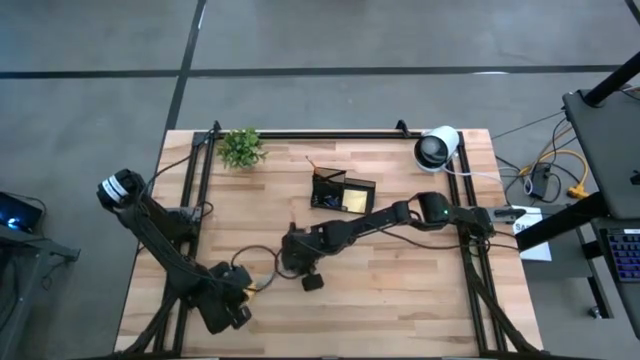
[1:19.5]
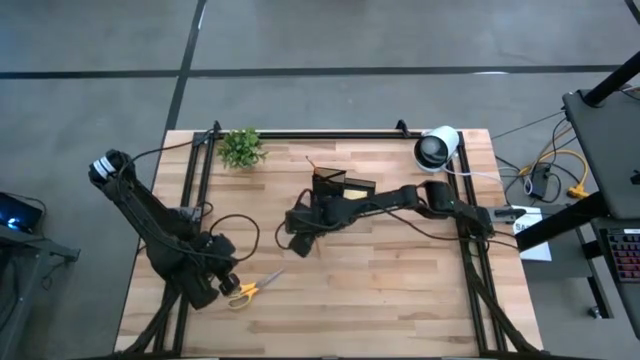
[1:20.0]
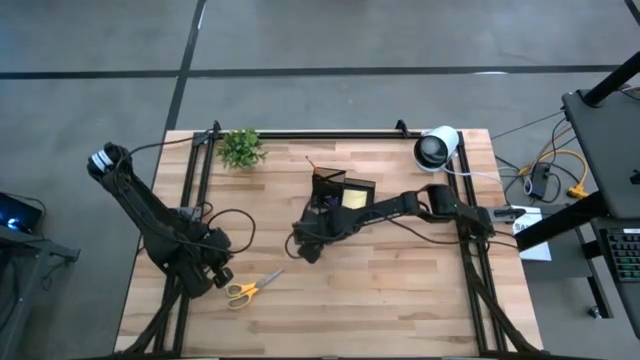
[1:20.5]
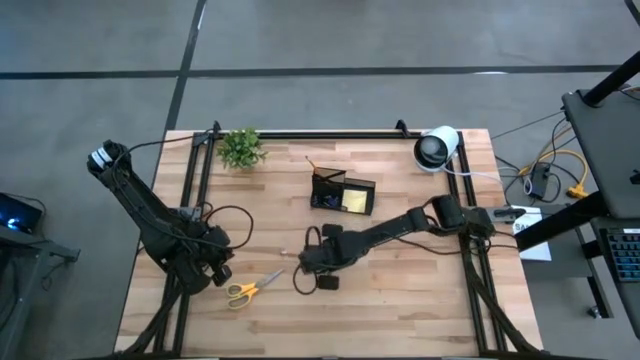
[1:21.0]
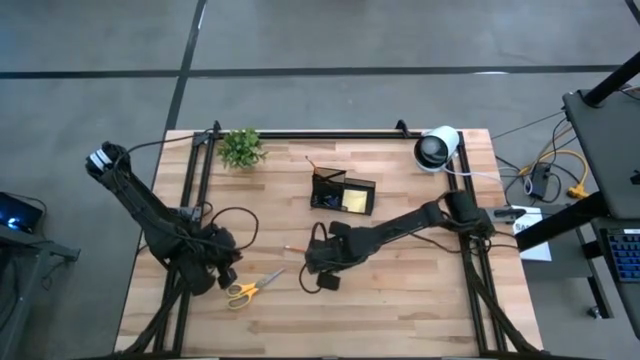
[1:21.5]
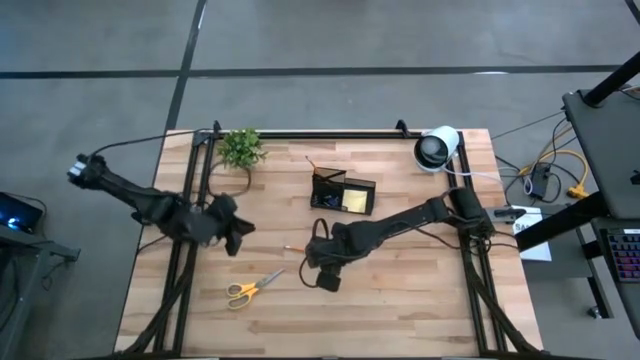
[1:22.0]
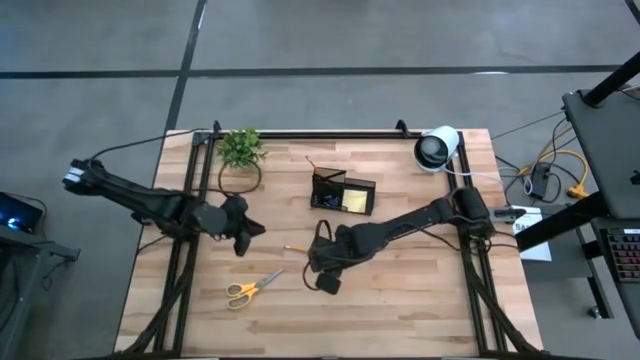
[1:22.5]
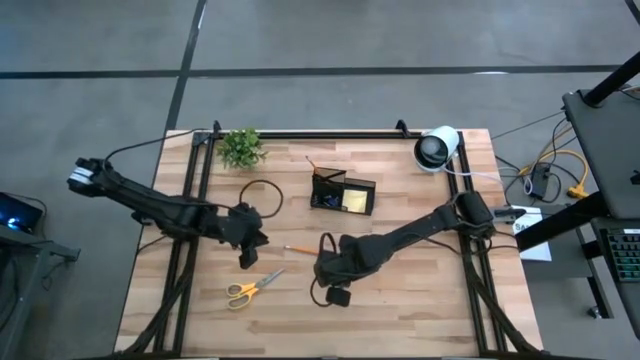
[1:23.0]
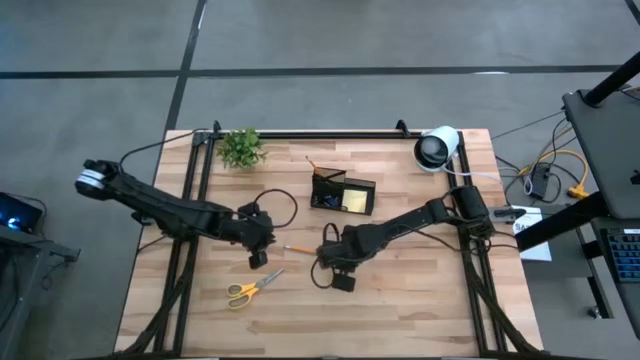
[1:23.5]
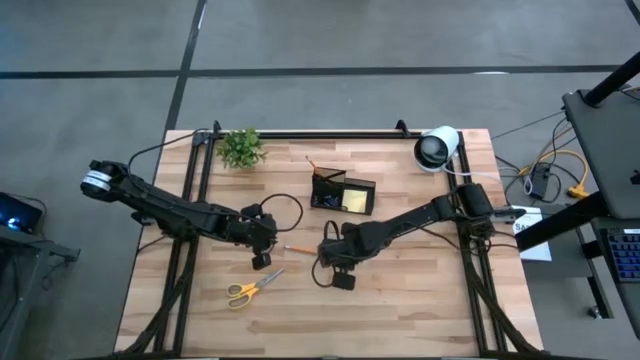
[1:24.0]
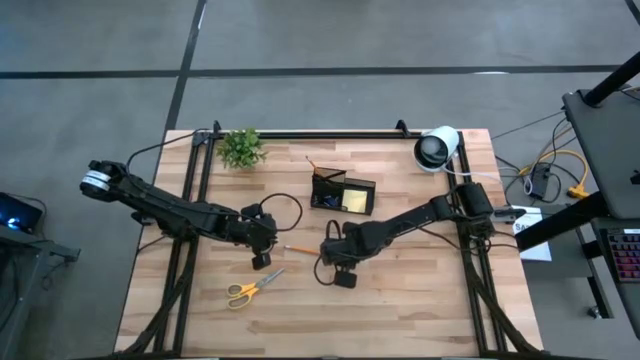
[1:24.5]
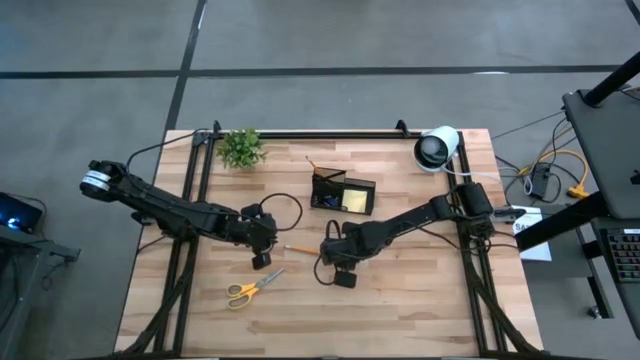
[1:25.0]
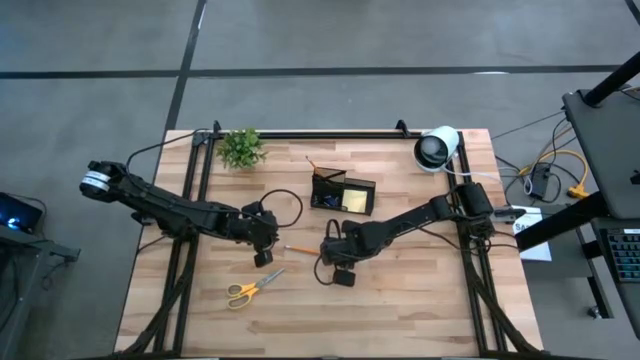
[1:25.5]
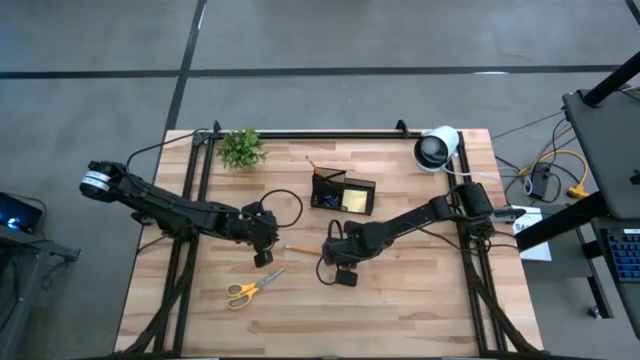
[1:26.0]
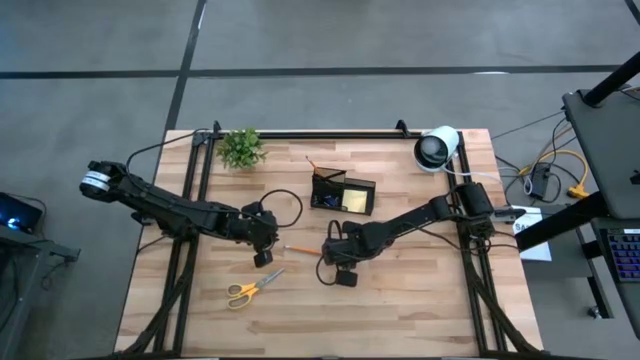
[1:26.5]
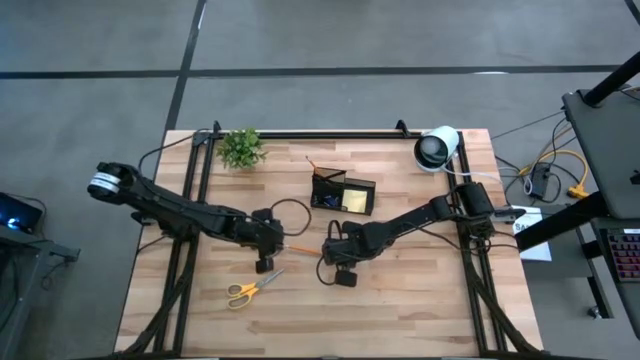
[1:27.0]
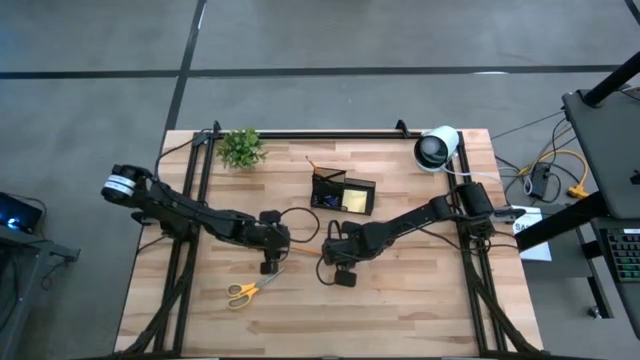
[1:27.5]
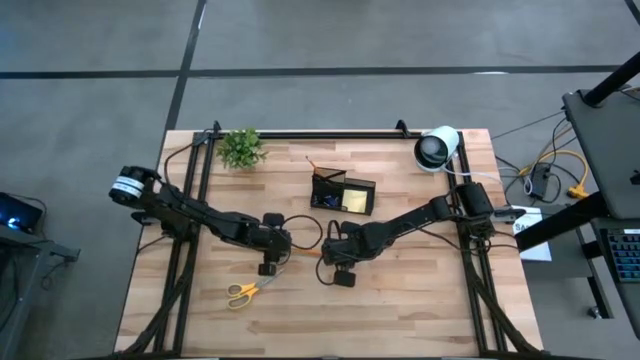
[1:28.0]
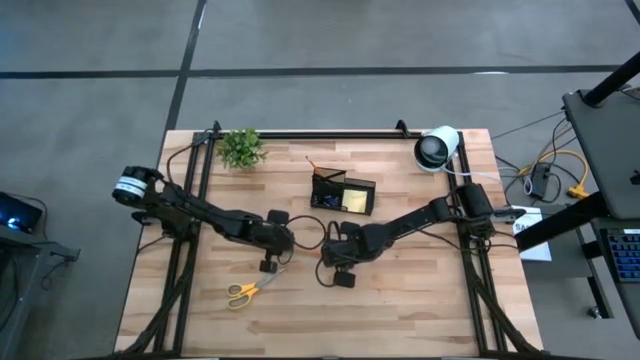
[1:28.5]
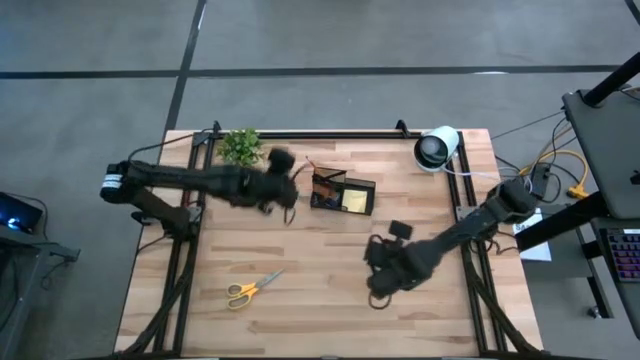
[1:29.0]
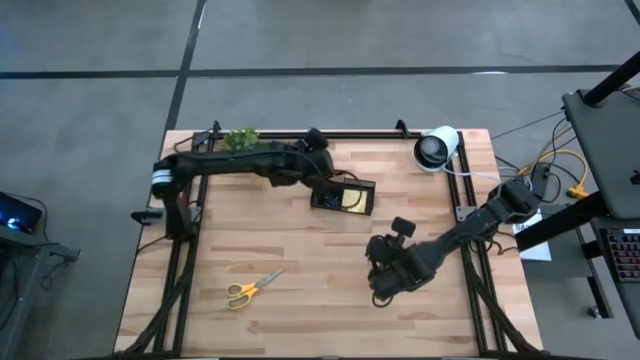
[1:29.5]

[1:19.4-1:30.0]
Task: Pick and place office supplies into organizer
Put the orange pencil into the black desk organizer

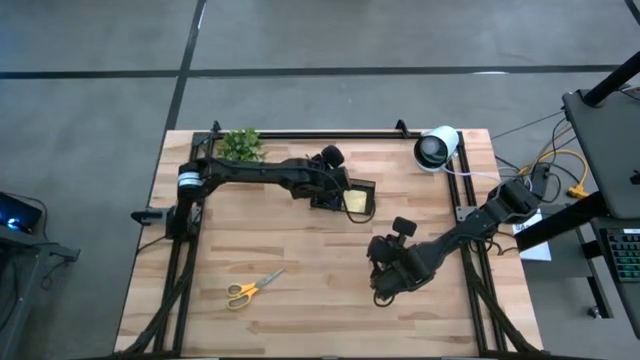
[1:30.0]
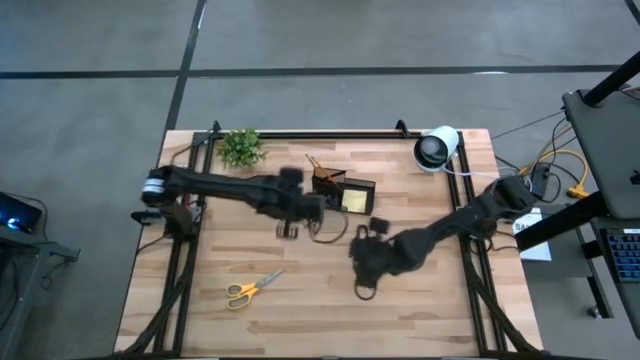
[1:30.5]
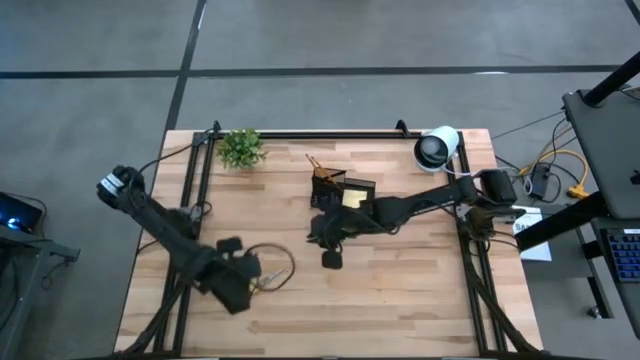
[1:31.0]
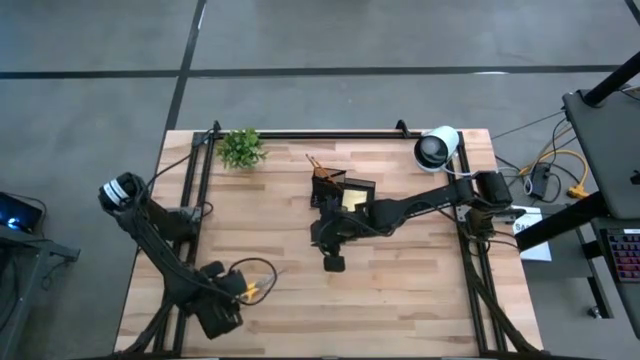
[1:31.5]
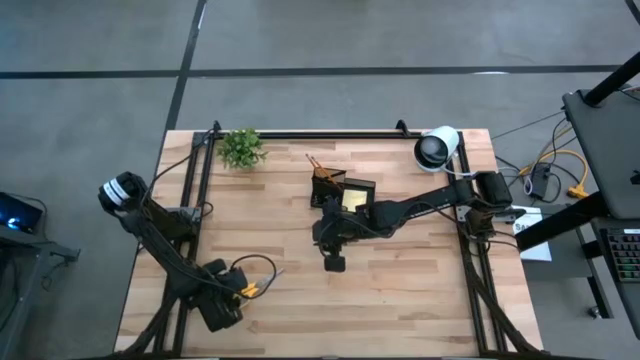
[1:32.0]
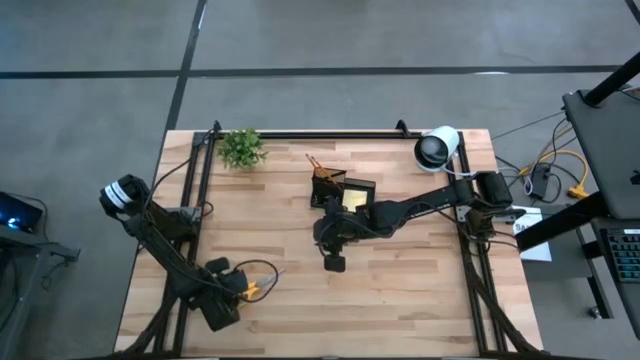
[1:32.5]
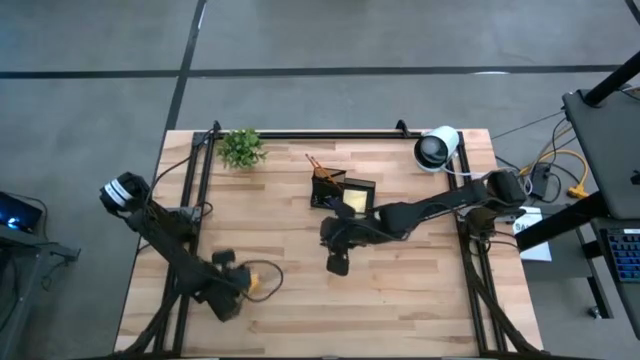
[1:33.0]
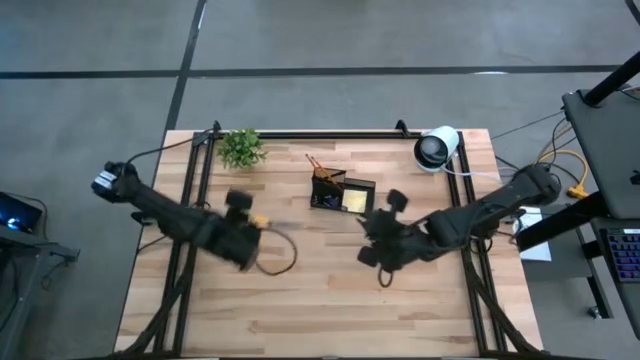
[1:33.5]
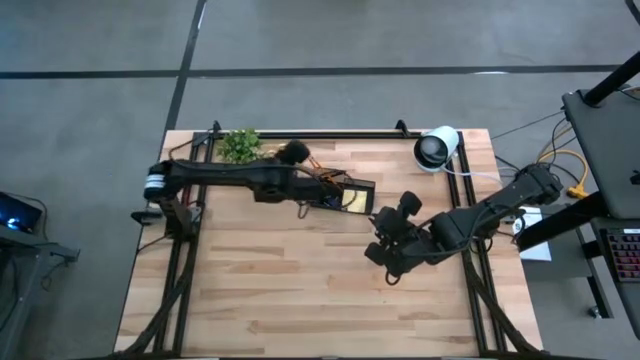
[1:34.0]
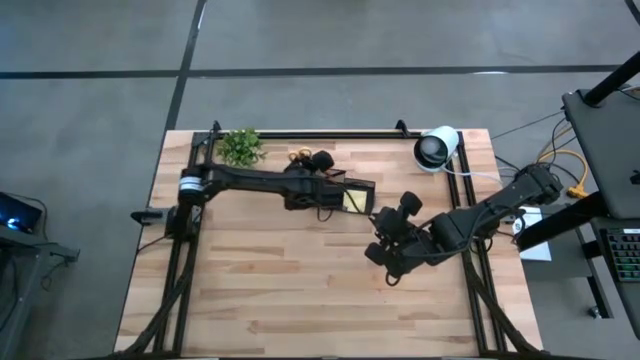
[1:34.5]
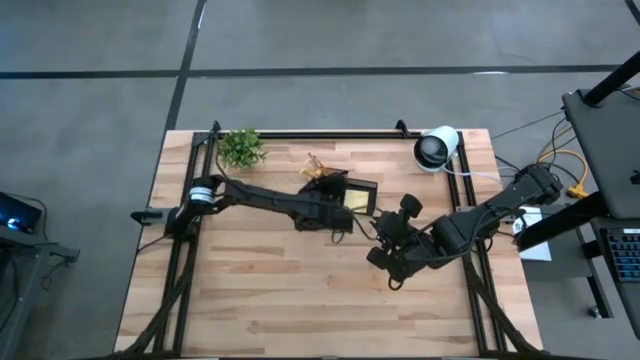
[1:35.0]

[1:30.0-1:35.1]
Put the yellow scissors into the black desk organizer

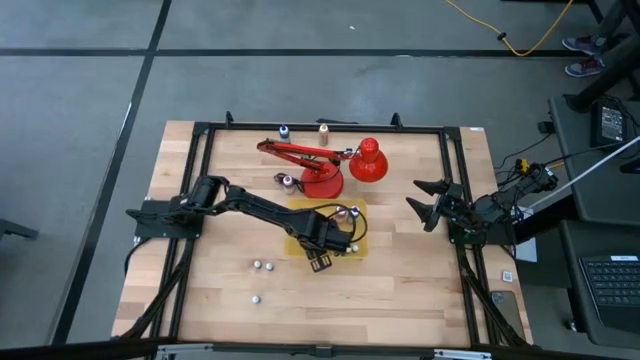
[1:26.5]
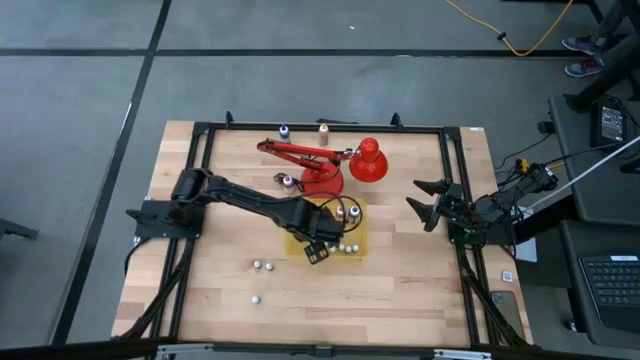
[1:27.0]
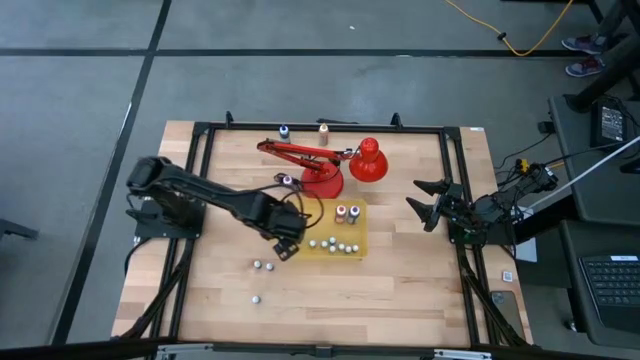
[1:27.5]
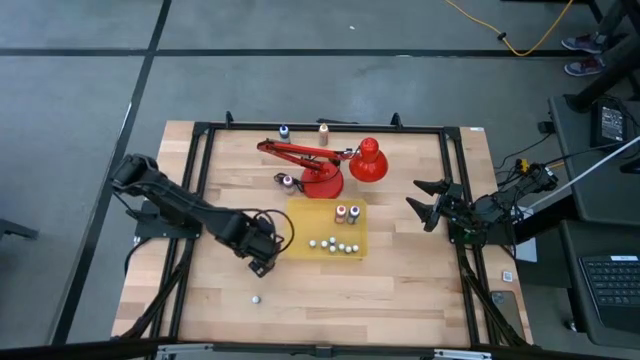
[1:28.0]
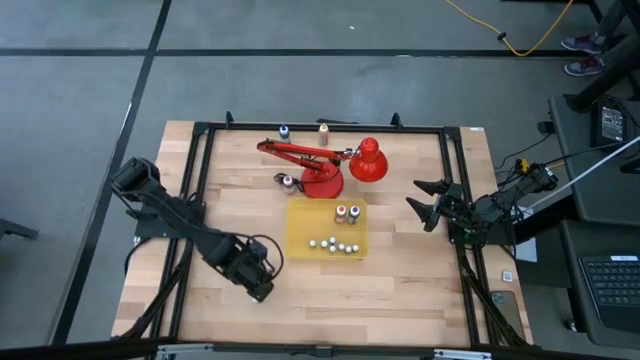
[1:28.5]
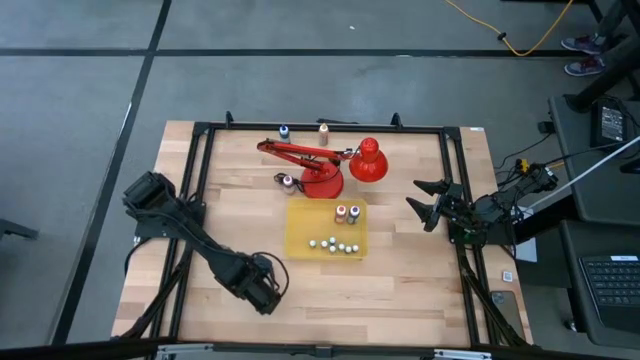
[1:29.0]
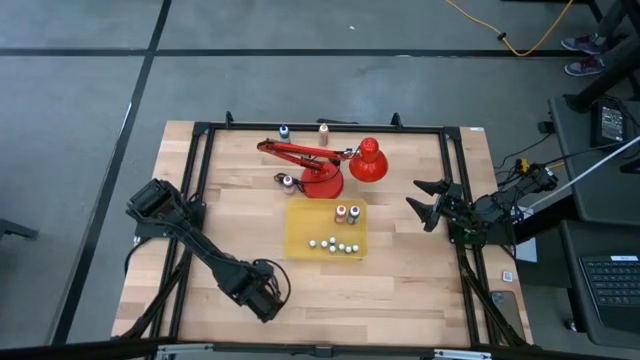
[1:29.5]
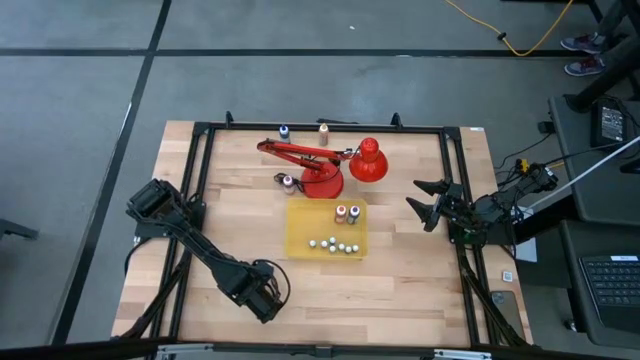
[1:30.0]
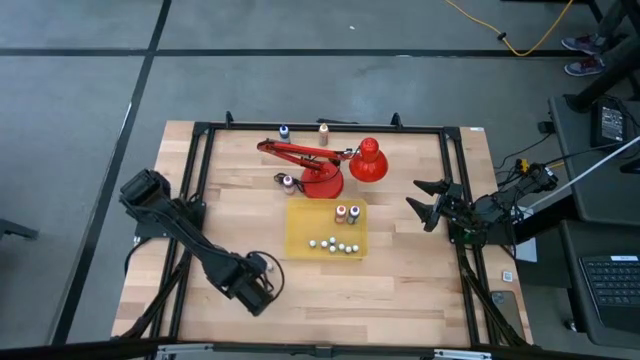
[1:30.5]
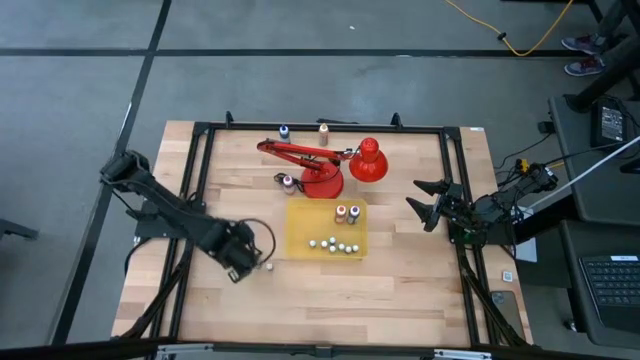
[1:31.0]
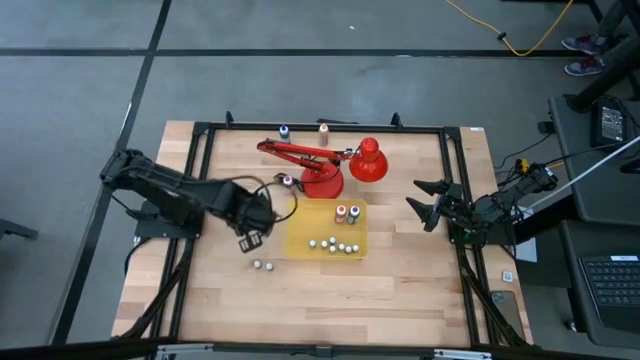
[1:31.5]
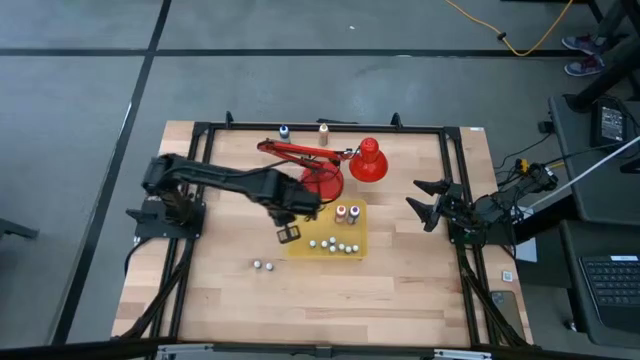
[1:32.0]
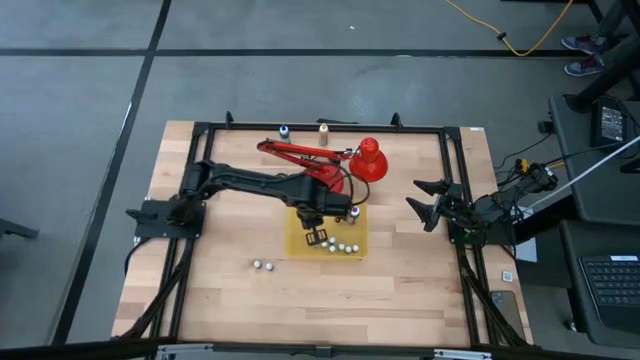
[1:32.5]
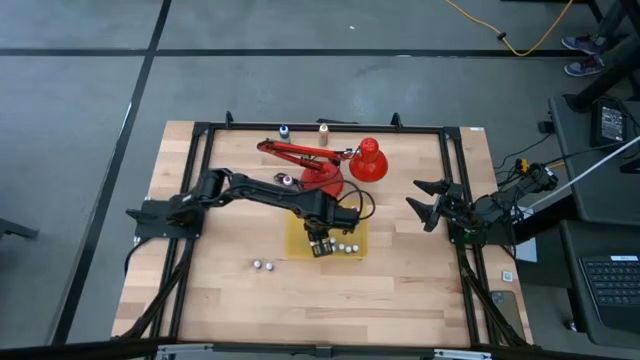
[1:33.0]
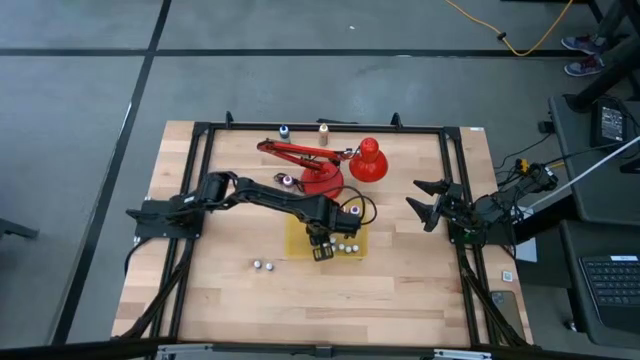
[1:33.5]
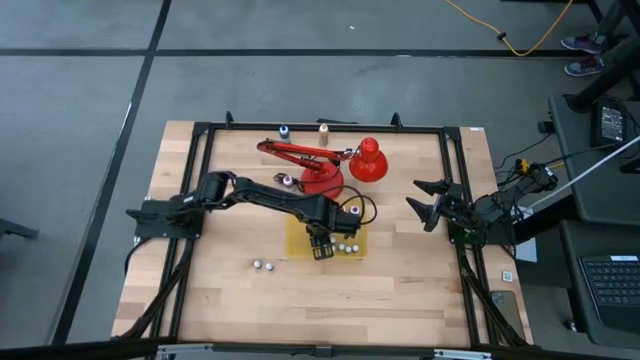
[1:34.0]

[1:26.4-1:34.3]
Task: Pick & Place food coloring
Put the small black food bottle into the yellow bin
